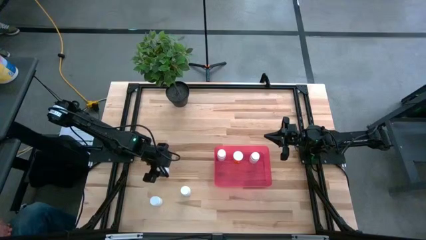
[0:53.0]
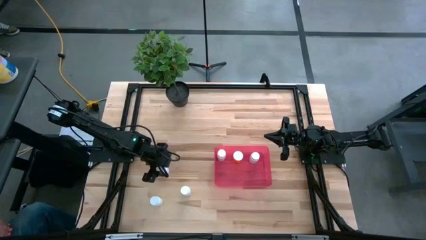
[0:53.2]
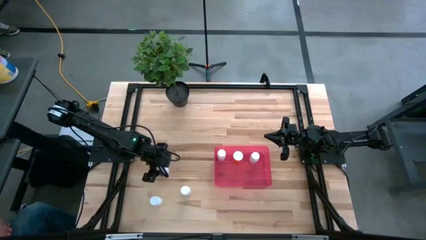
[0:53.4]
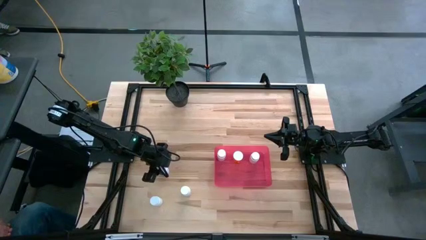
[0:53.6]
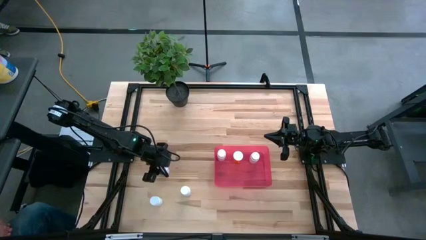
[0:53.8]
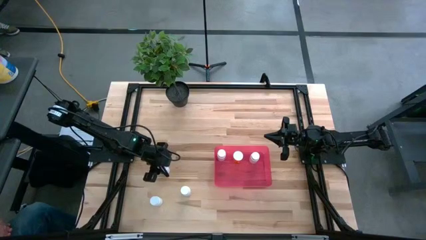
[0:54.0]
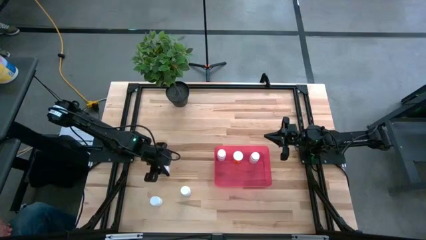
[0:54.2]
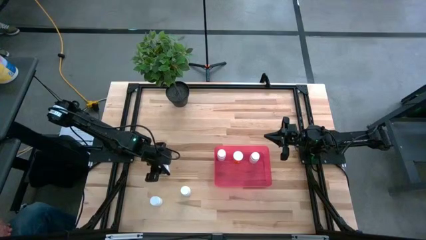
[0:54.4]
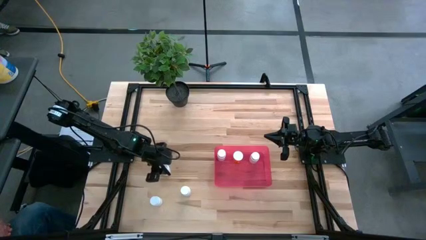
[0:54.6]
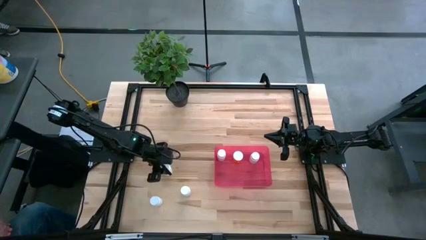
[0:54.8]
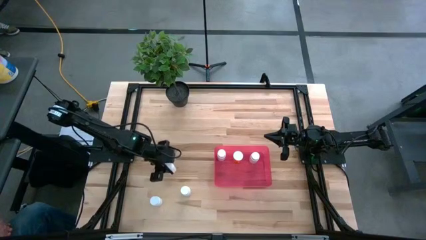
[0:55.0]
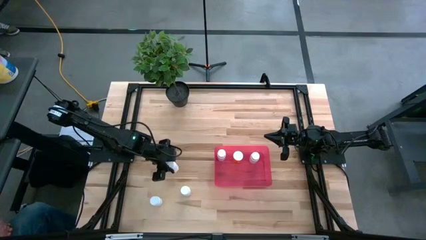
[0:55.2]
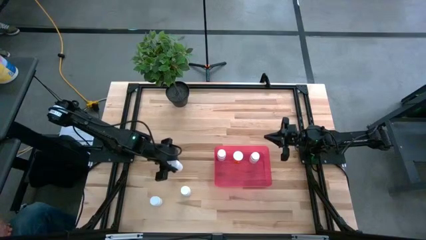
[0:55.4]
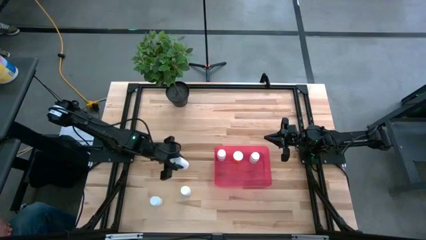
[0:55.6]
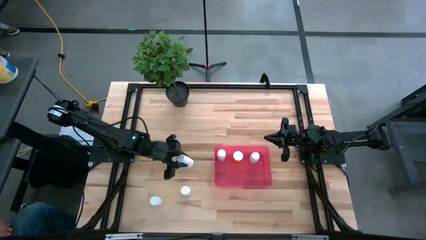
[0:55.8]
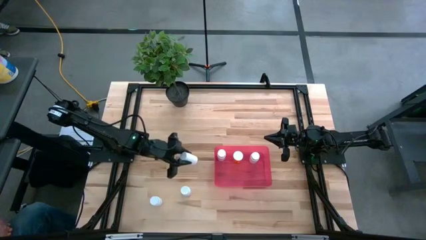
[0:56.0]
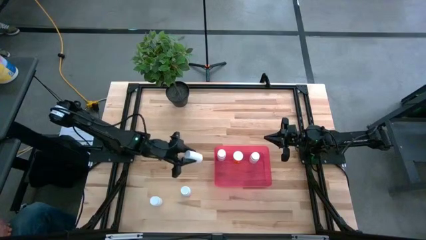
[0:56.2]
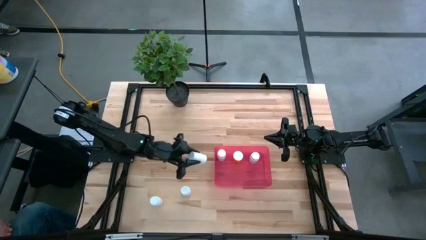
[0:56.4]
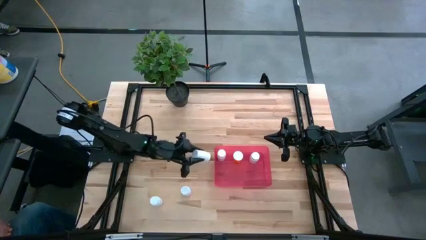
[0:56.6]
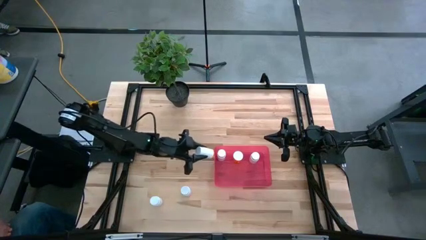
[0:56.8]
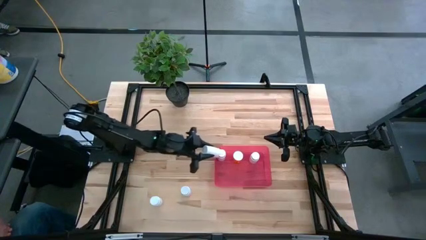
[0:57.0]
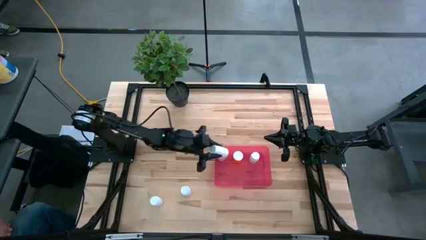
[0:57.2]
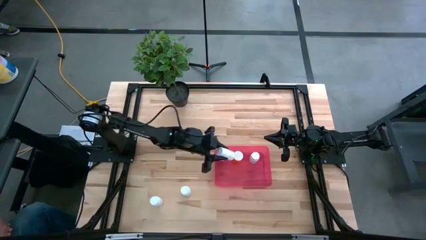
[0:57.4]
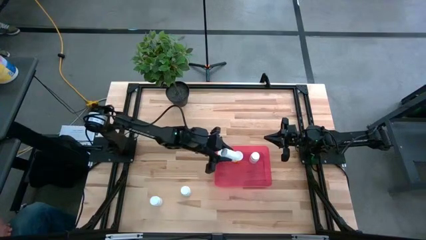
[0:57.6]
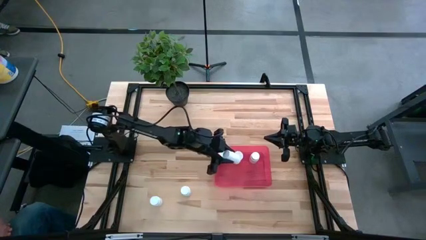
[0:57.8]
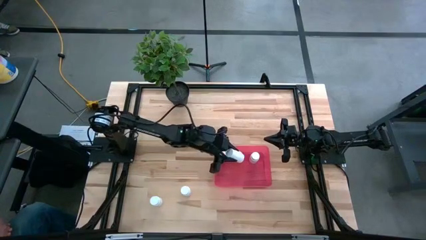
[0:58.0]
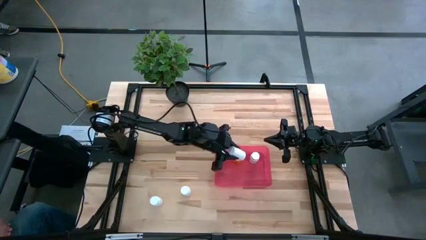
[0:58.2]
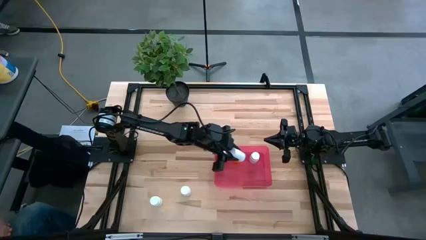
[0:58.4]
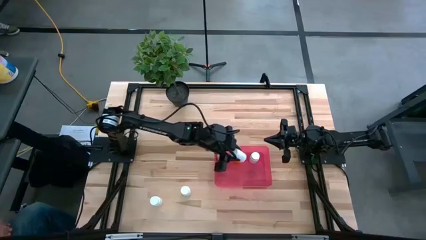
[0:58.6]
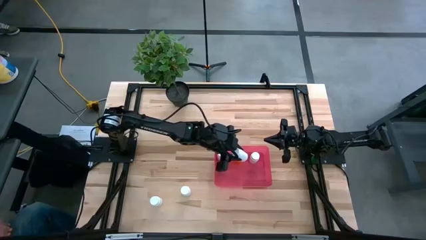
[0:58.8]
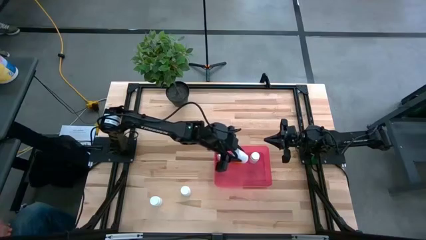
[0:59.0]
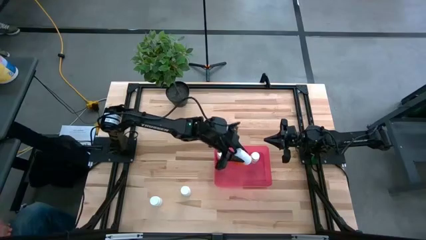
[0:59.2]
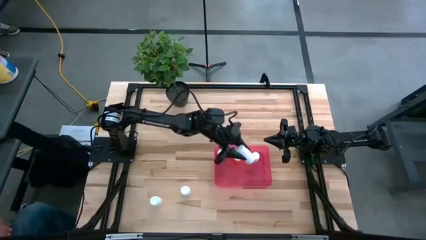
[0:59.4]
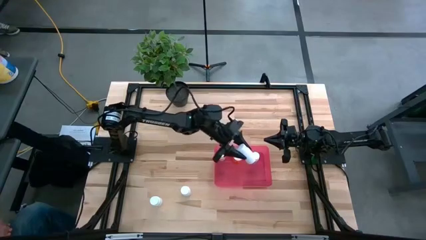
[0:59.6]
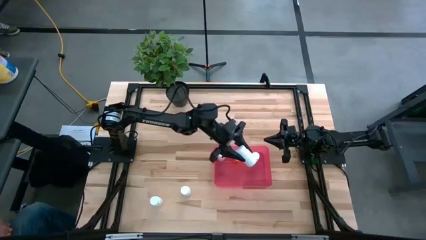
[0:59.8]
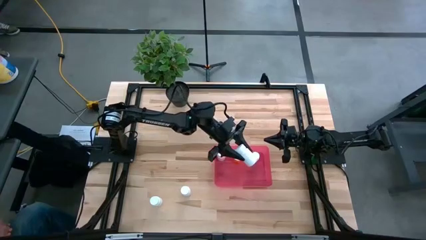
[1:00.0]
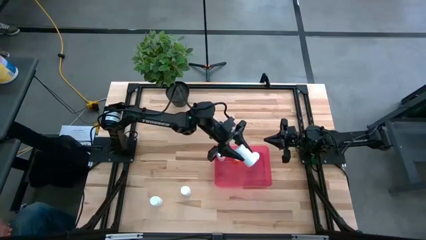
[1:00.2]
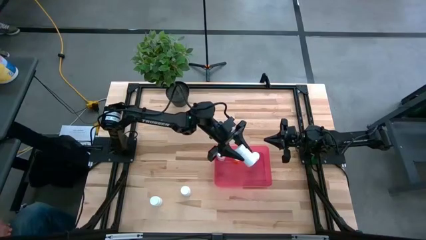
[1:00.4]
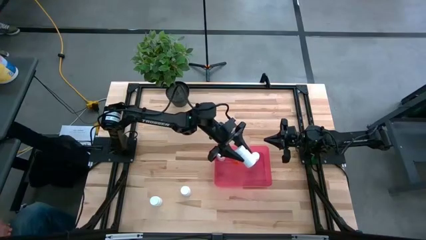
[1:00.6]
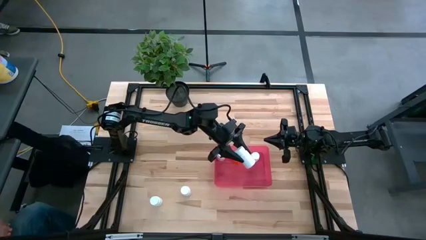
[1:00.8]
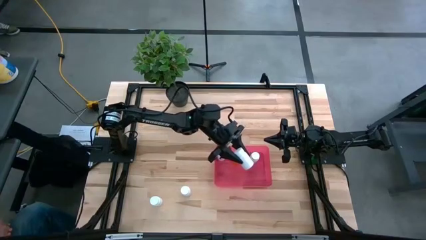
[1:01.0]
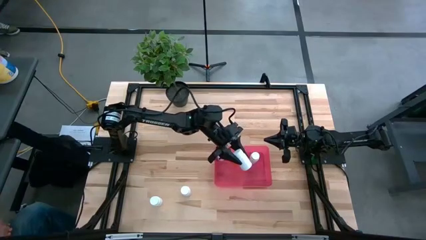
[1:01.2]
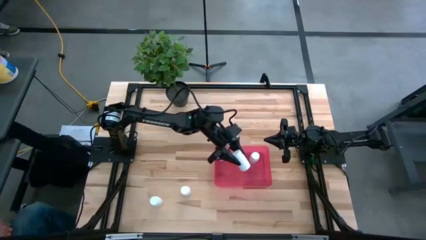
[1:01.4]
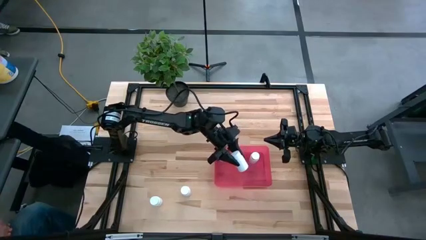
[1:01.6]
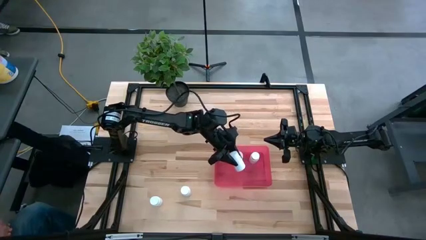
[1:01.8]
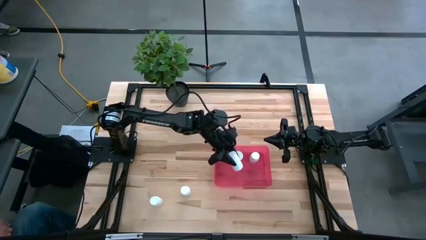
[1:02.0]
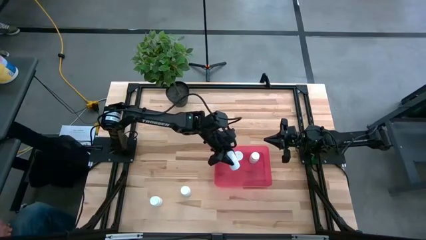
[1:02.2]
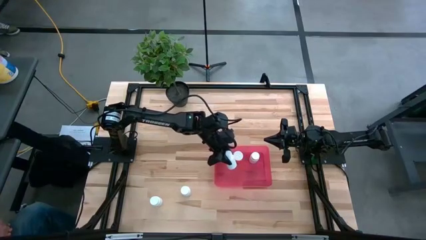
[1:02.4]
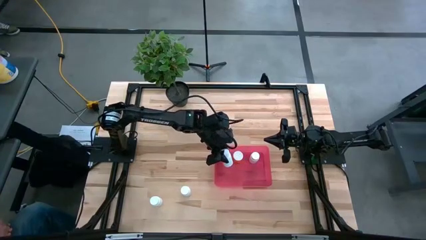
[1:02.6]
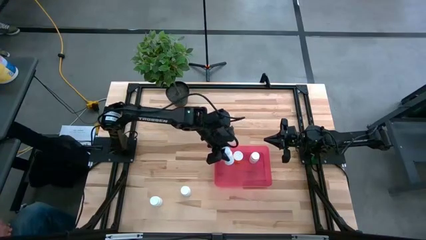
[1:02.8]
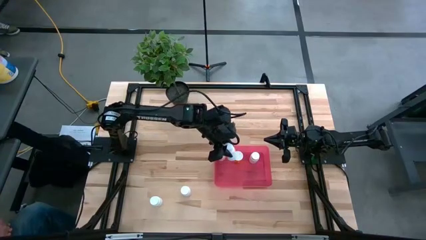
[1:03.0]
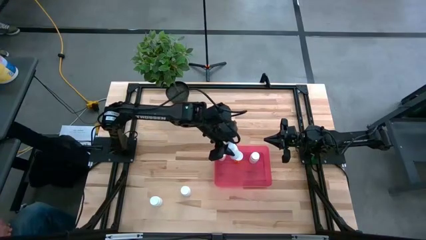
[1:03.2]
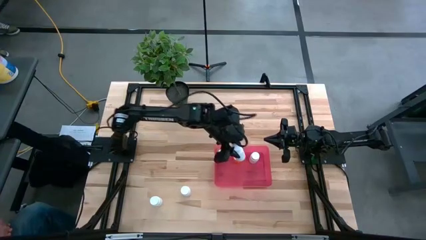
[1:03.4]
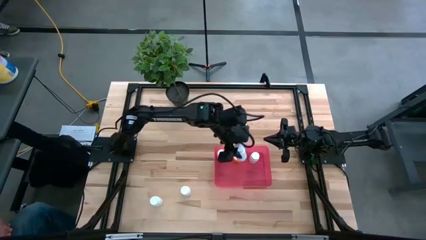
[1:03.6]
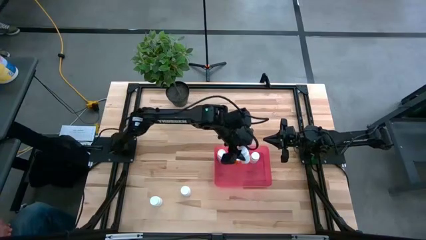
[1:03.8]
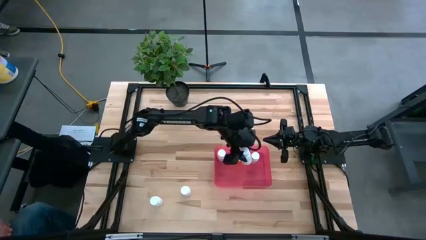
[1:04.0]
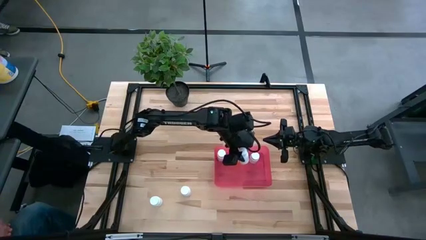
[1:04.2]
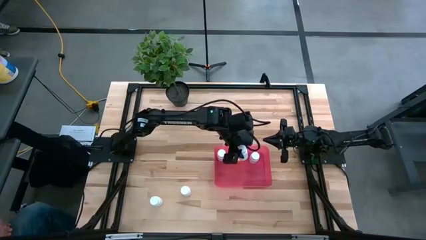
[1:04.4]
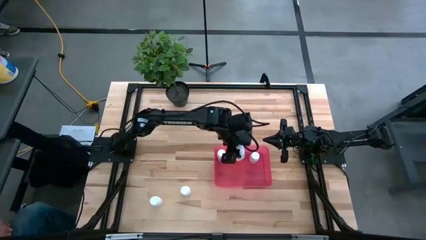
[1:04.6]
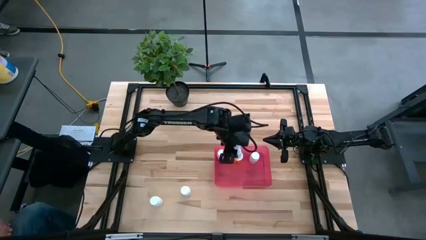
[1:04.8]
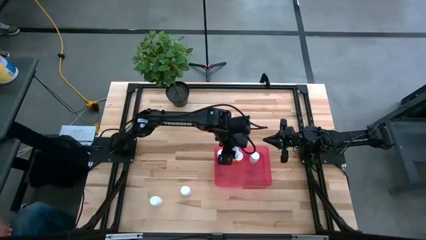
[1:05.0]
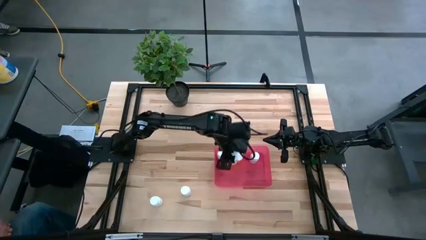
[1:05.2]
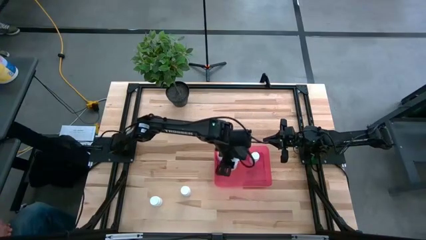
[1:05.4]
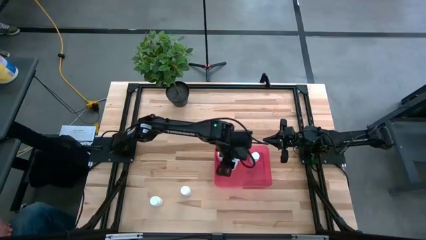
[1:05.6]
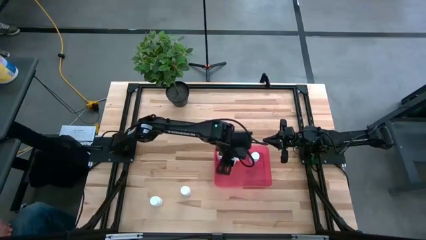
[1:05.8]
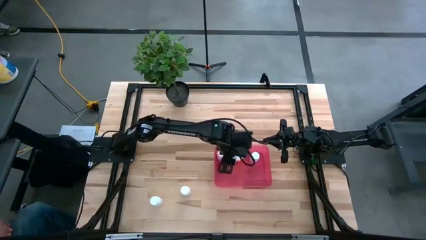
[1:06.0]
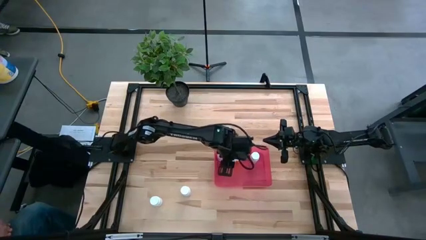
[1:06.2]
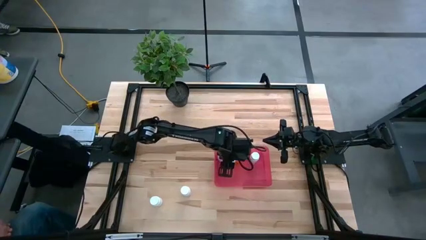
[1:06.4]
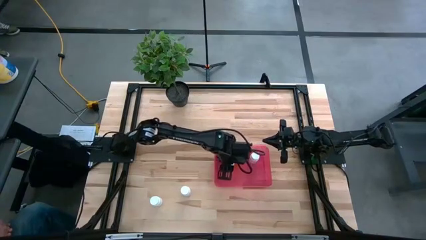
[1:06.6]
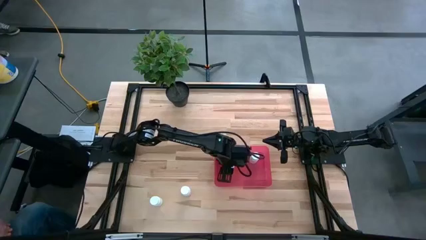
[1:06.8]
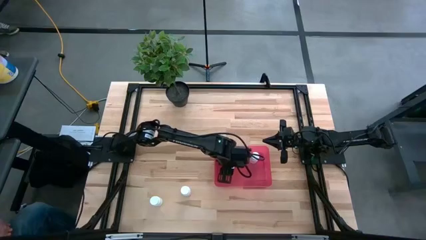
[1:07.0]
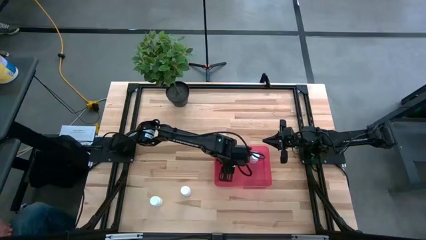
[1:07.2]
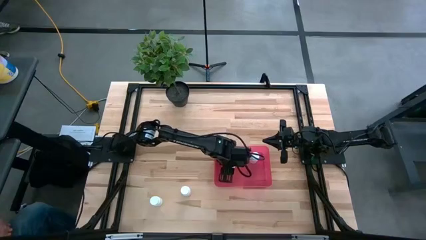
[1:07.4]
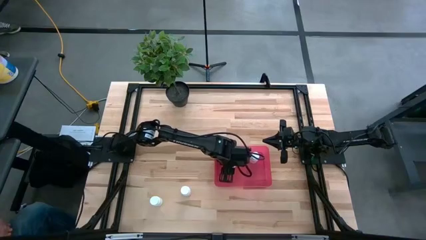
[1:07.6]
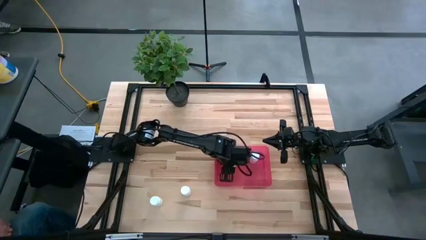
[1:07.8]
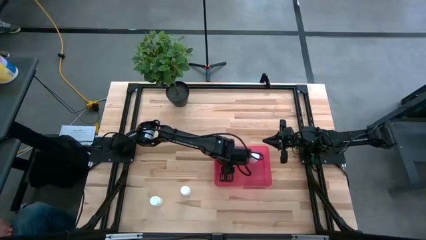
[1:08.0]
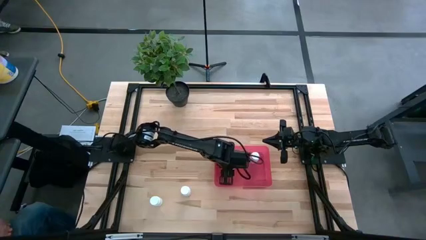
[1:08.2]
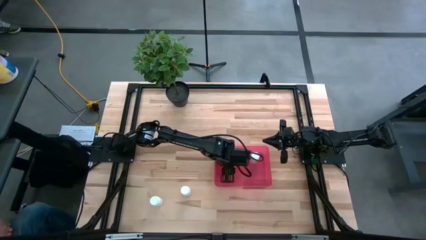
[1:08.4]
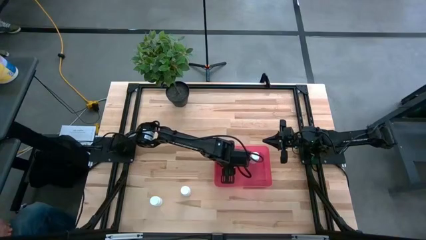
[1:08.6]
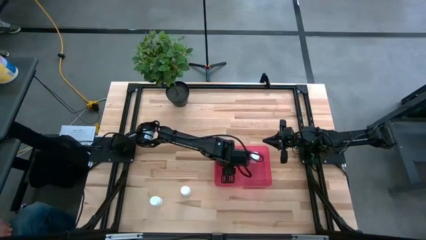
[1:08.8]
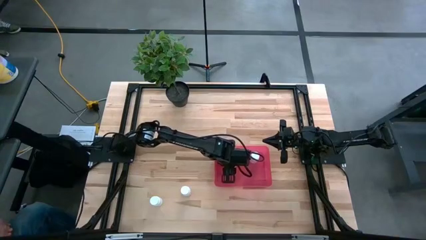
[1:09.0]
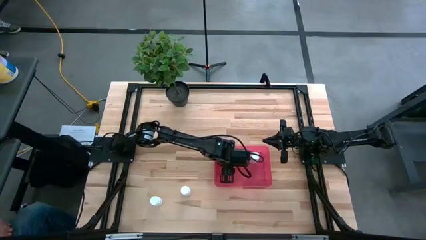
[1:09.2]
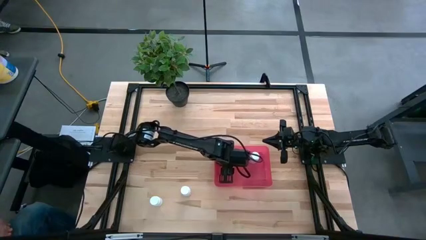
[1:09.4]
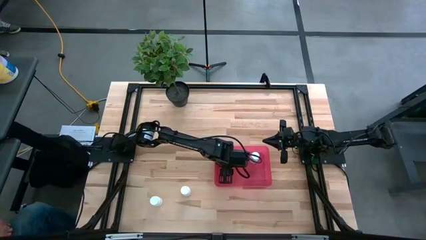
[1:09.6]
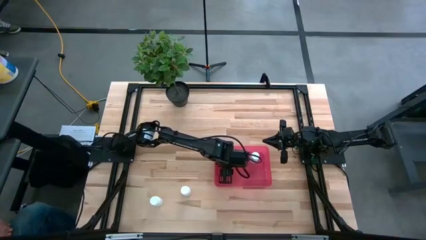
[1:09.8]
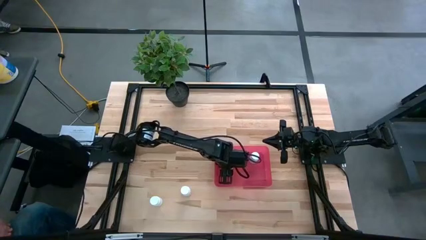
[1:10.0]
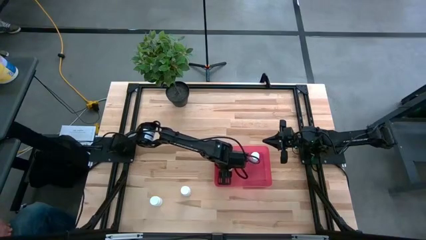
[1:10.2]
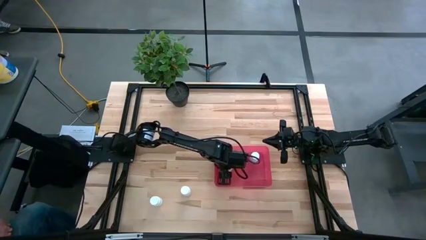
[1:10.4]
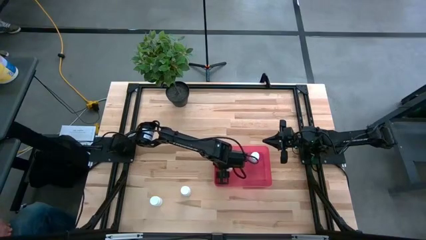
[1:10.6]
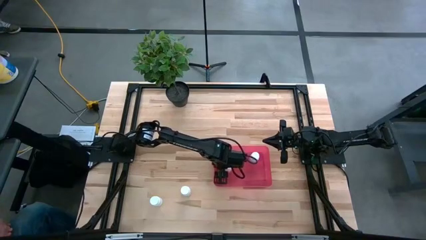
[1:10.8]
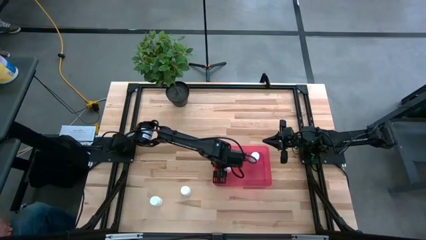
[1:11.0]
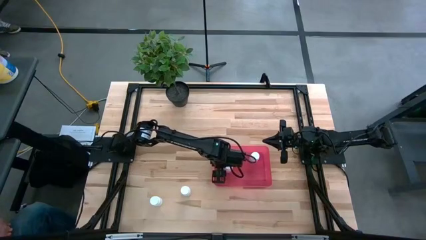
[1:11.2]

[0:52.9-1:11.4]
Task: Pick and place pill bottles into a basket
Put the white pill bottle into the pink bin
